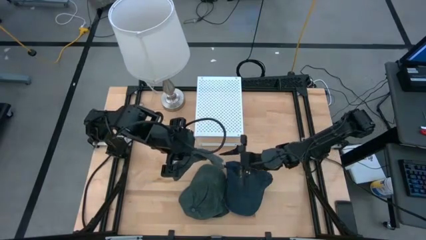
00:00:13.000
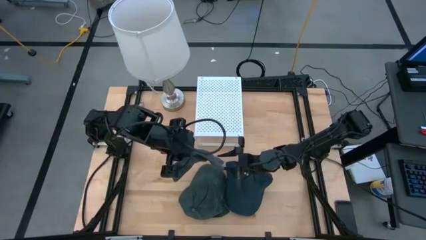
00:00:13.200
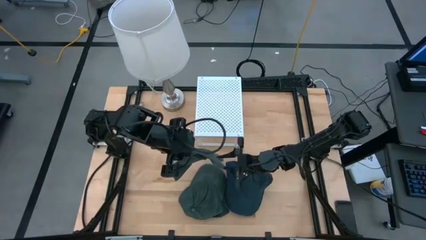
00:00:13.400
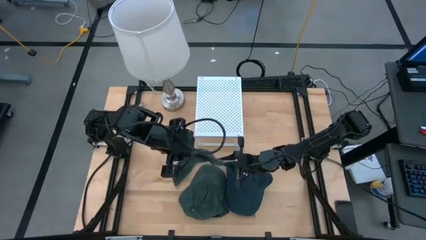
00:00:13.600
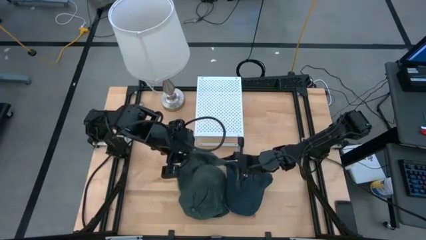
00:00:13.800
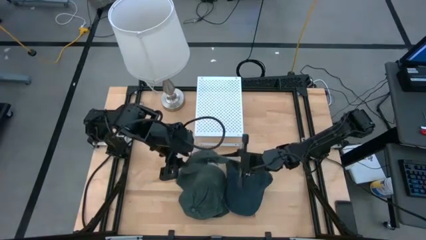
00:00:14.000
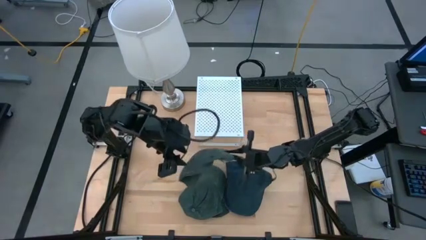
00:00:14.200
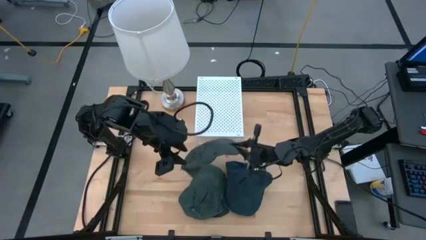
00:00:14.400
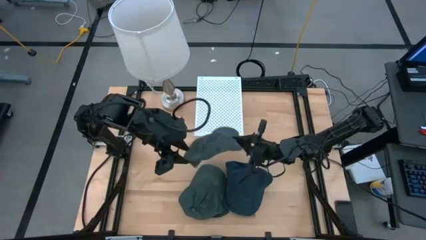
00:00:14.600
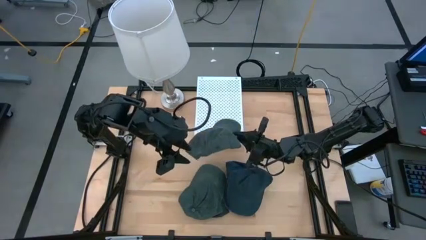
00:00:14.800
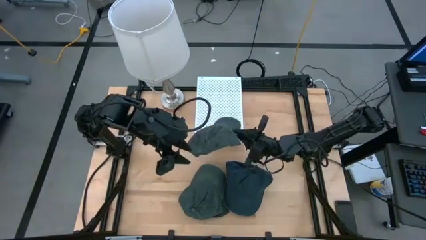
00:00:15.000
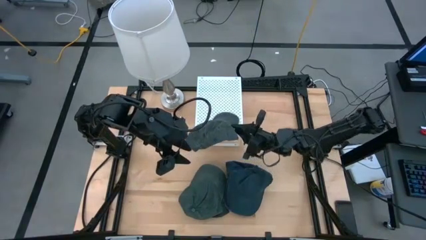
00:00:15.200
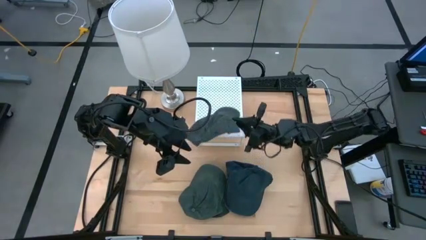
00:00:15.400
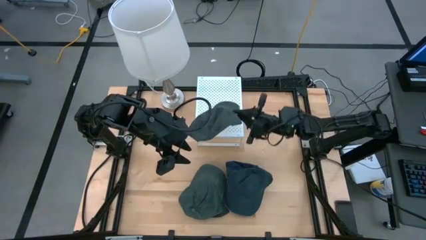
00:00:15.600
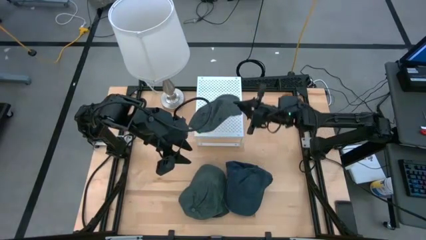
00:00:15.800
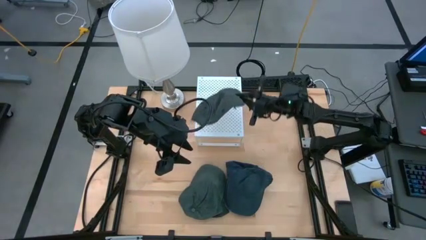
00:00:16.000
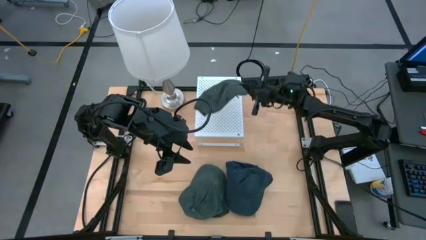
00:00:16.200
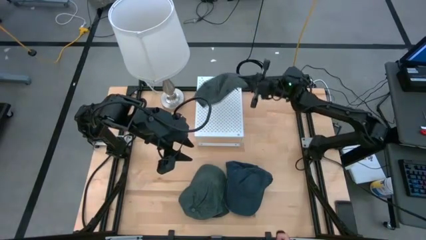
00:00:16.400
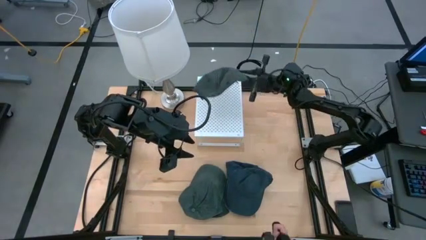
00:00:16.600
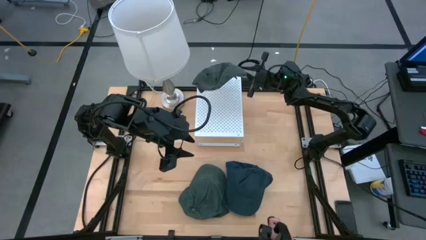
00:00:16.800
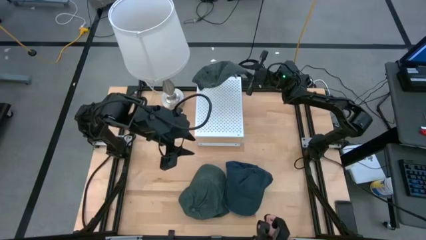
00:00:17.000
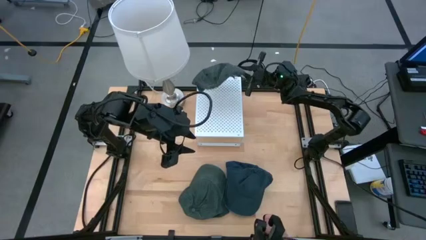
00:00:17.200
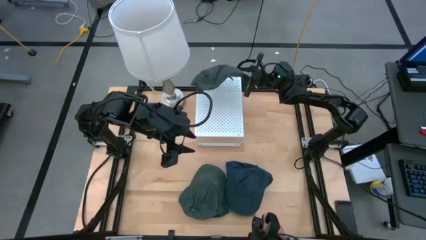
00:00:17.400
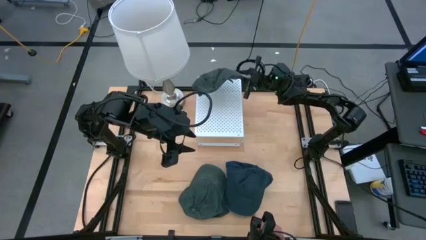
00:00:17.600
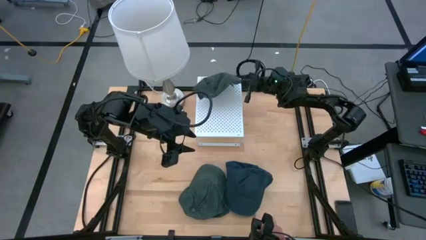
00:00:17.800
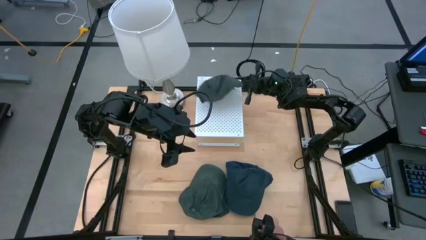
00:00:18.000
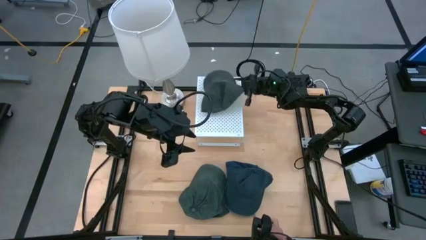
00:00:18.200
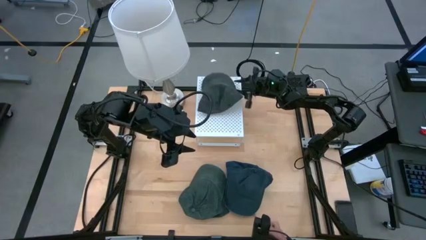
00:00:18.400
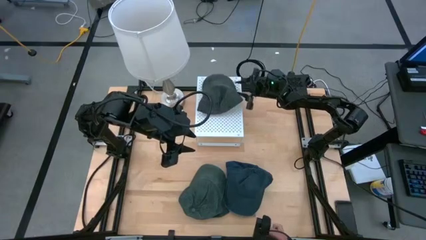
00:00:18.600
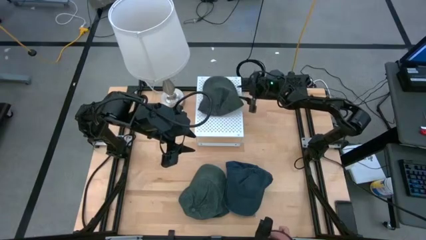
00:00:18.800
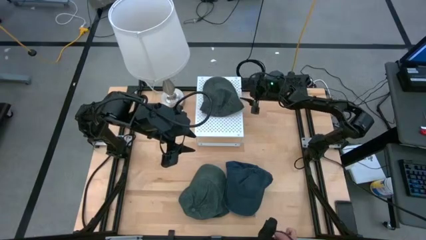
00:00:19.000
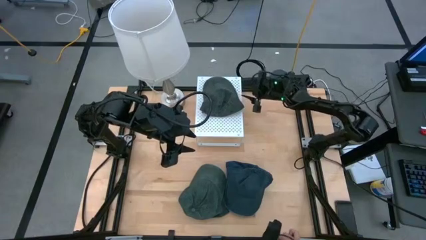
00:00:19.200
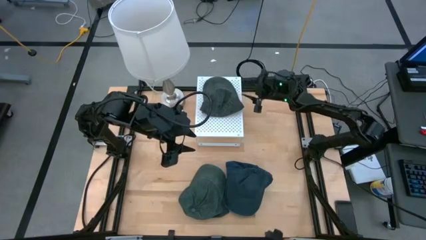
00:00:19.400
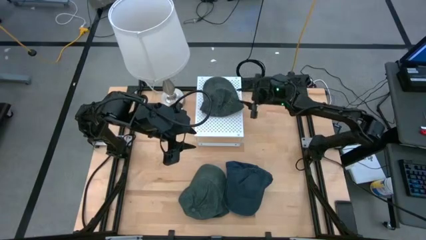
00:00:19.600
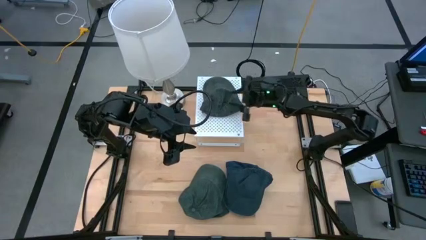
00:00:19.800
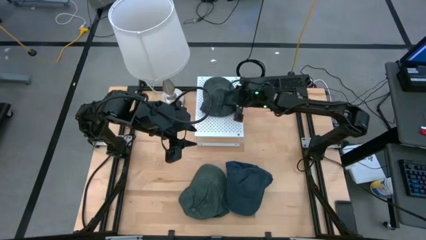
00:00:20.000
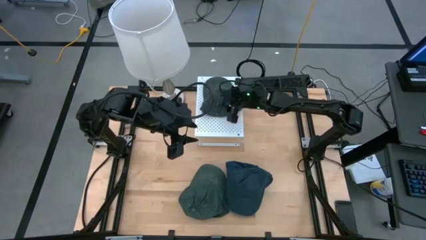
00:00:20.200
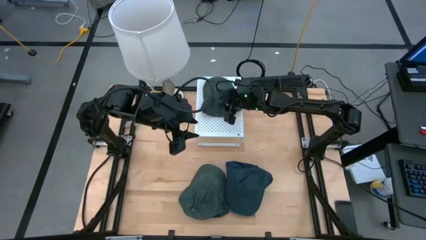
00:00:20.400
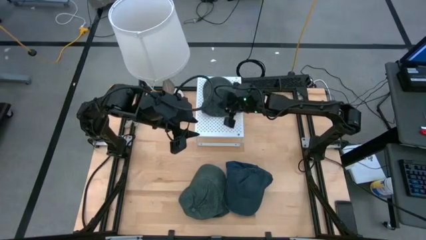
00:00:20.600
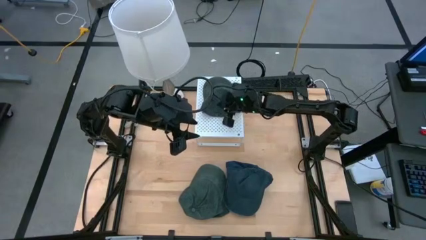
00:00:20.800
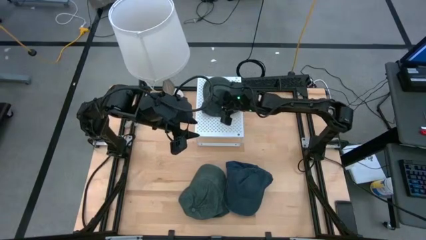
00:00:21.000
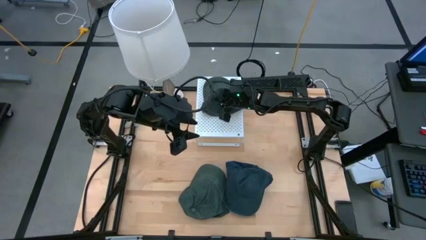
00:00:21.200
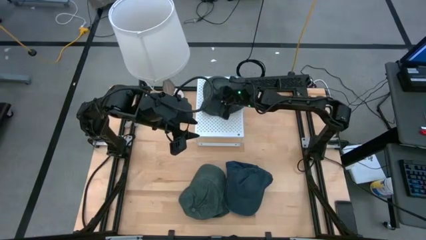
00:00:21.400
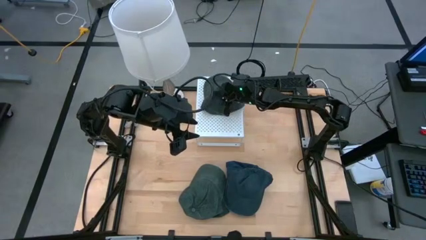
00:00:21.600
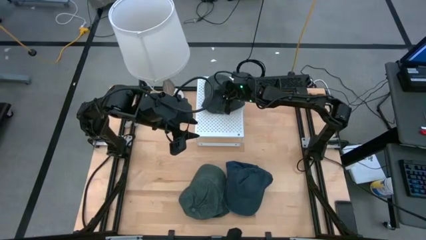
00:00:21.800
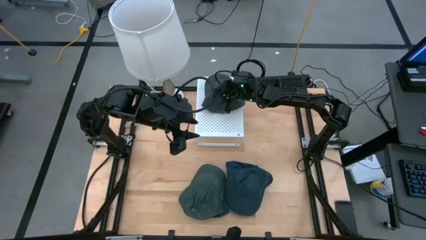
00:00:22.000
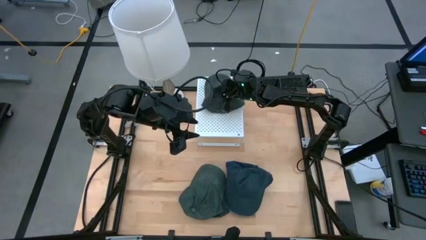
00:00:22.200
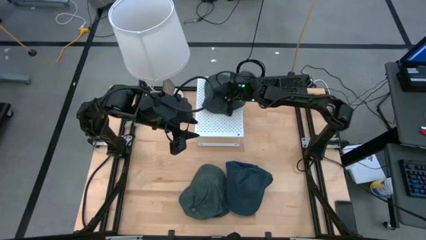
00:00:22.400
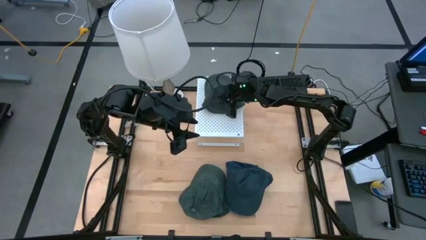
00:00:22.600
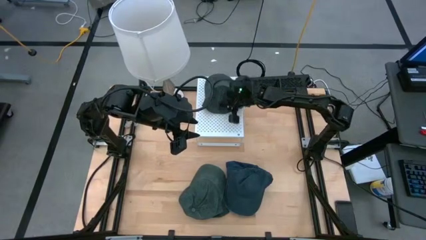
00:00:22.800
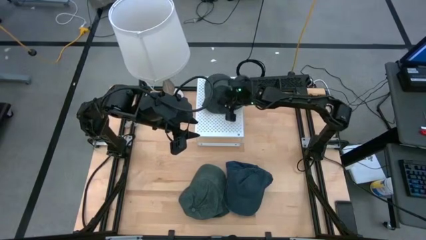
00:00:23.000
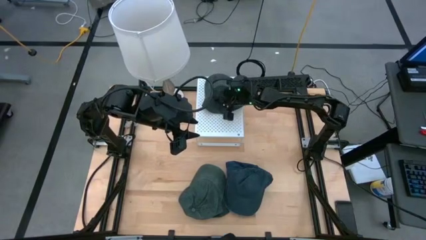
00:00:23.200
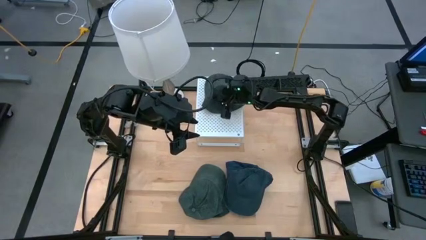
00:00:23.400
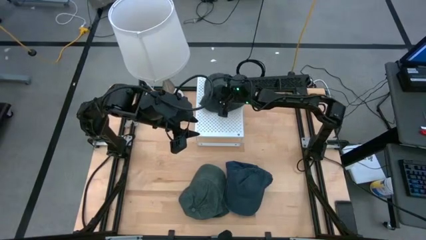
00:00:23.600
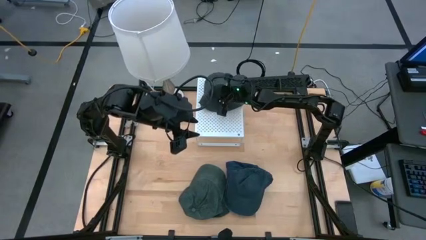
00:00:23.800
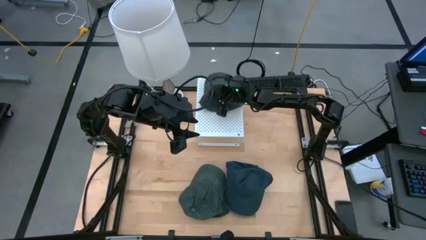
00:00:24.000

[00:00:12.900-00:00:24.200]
Task: Pick & Place hat
Put the black cap on the shelf

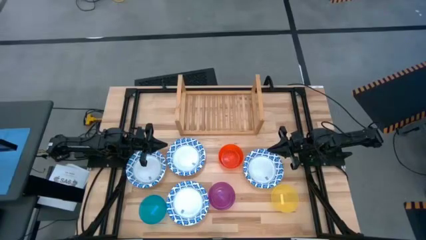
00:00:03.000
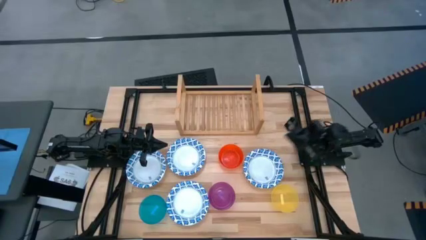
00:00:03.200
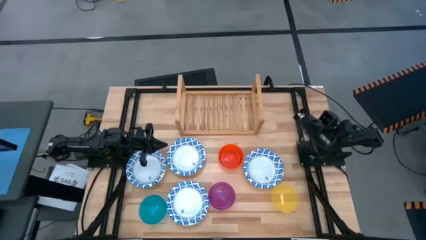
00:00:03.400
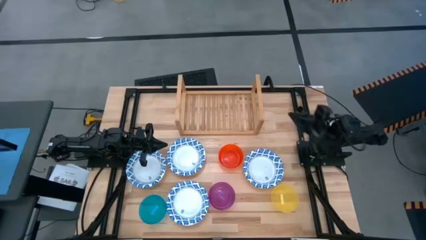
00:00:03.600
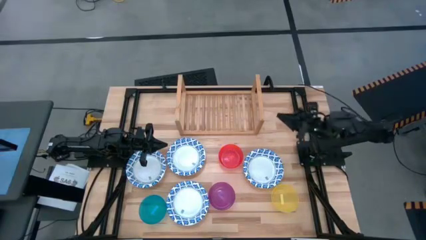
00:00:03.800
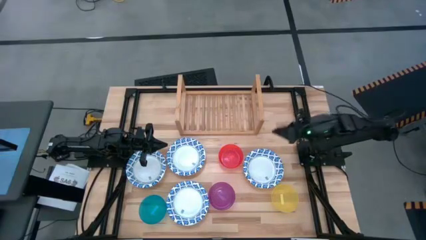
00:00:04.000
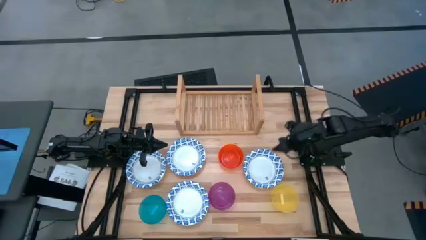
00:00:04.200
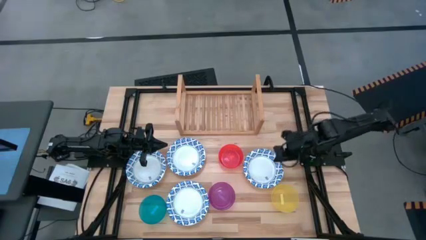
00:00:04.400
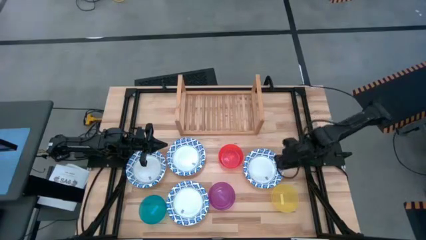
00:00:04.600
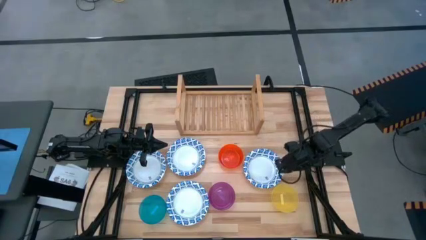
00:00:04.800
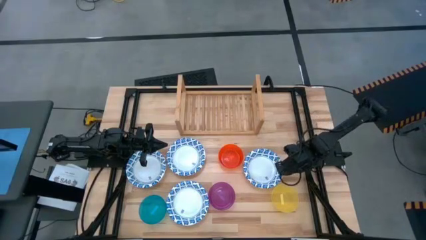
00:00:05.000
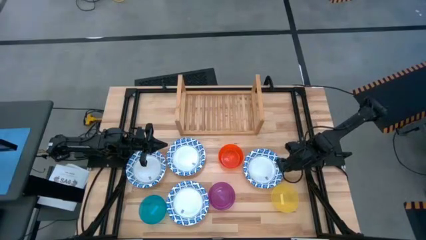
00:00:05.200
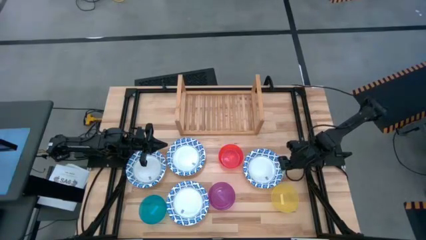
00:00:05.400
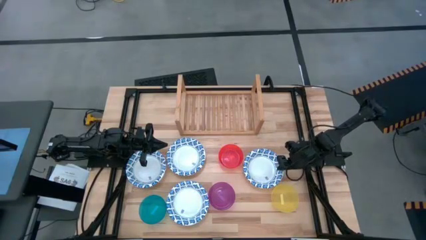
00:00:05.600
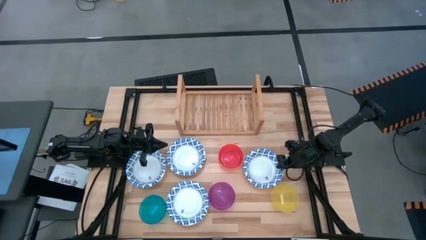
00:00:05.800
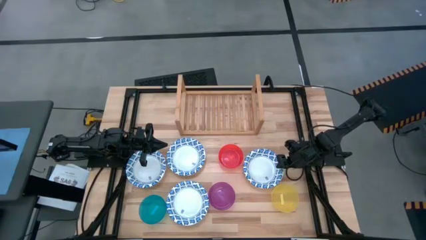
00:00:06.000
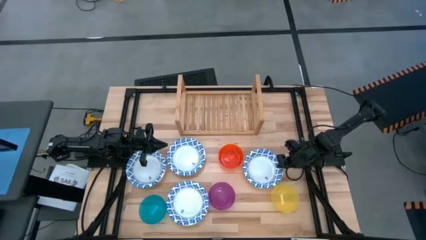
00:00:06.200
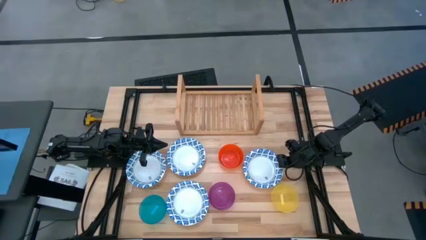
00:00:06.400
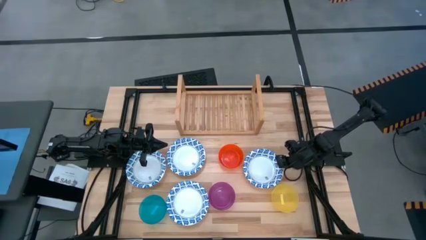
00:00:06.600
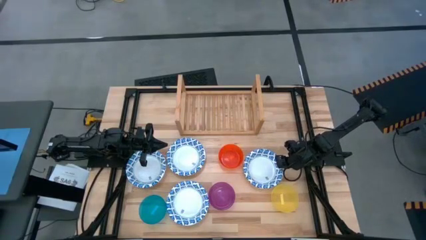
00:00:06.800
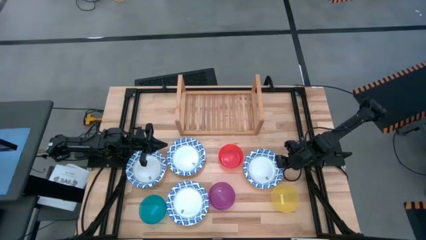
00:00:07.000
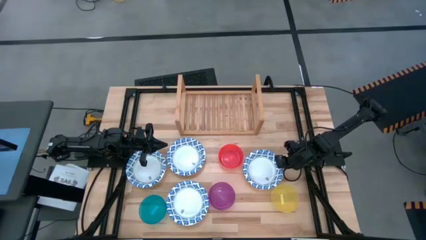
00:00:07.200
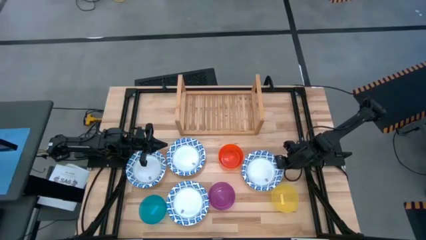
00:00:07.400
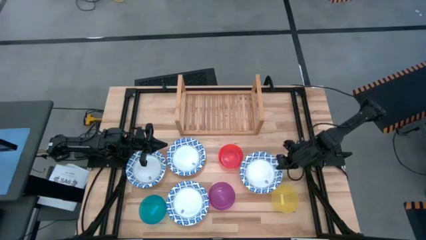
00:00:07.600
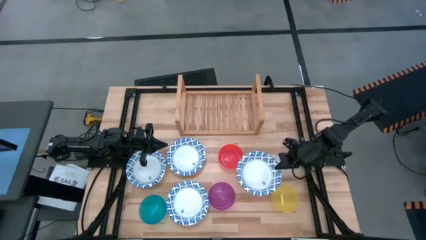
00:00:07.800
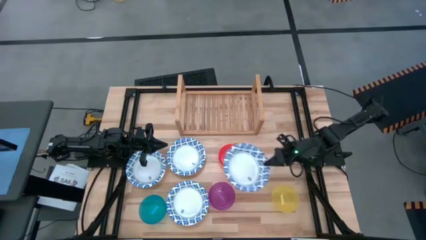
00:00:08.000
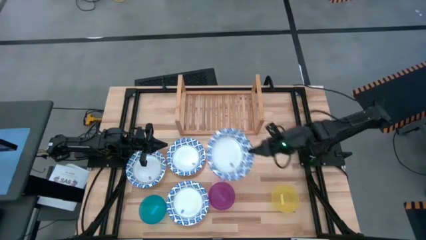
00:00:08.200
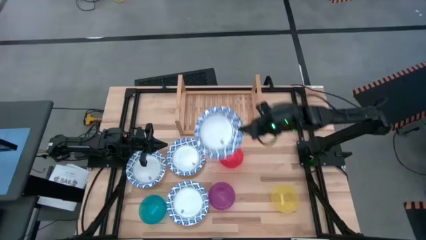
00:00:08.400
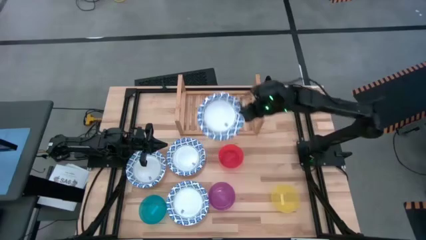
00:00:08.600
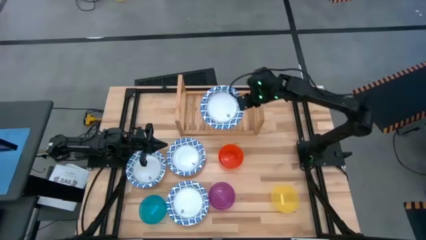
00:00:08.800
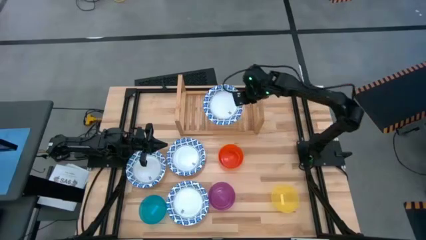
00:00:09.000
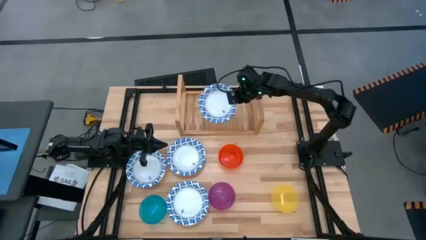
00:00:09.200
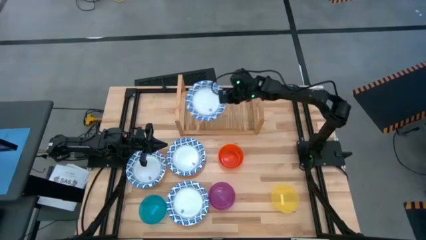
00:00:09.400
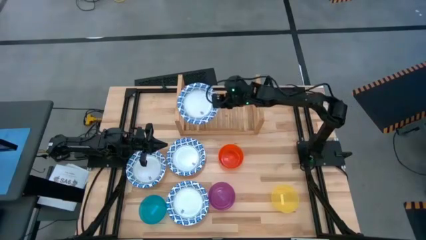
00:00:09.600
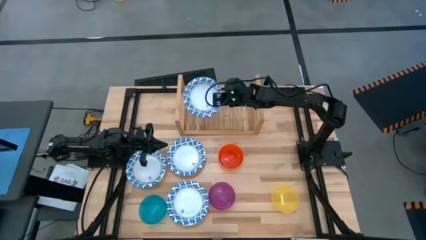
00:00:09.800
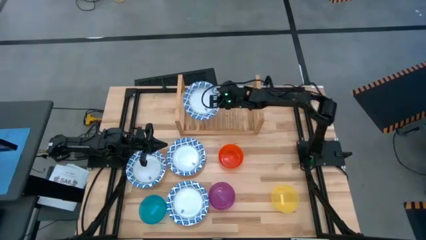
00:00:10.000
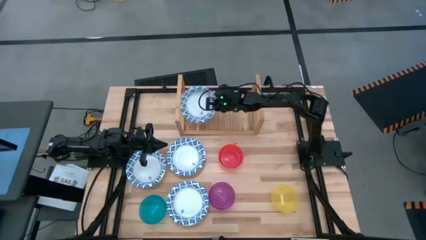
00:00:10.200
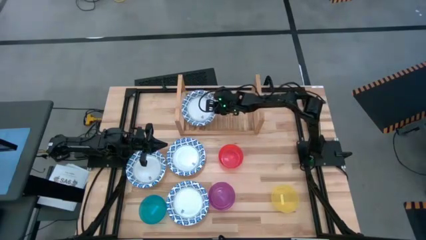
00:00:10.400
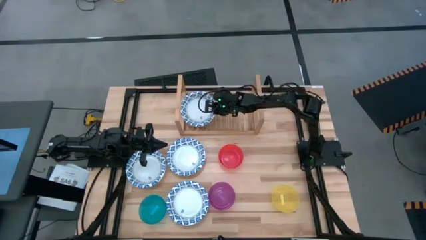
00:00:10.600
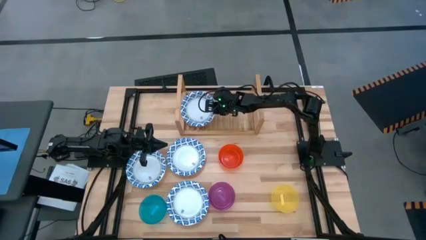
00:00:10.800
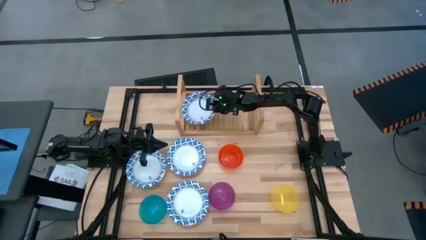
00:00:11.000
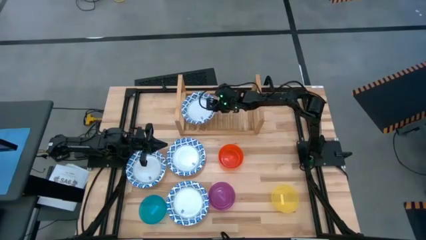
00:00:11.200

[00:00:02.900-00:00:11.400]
Task: Place and stack bowls onto a shelf
Put the right blue pattern bowl on the shelf
